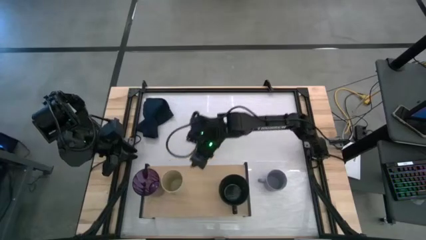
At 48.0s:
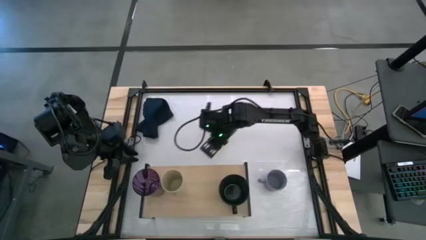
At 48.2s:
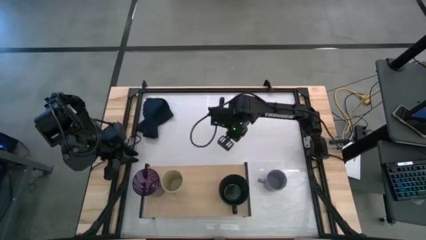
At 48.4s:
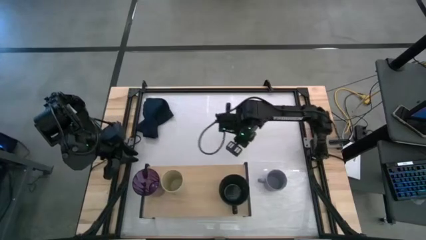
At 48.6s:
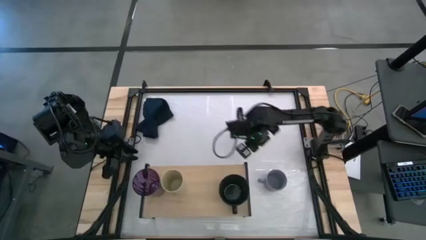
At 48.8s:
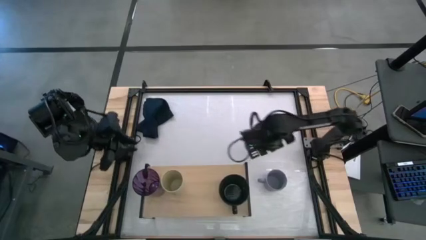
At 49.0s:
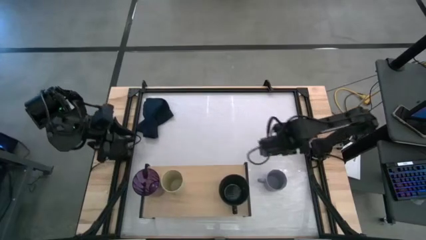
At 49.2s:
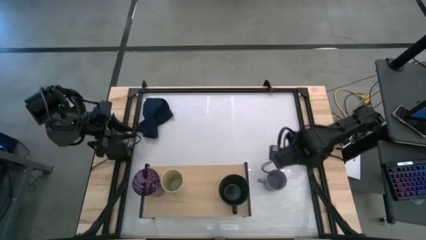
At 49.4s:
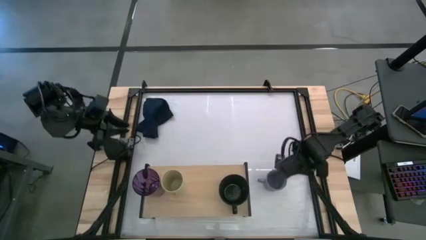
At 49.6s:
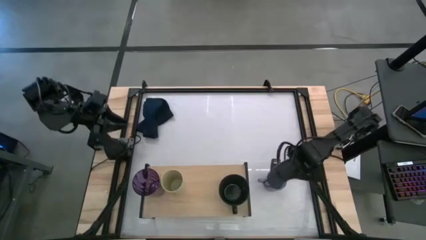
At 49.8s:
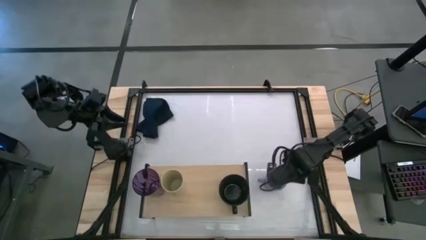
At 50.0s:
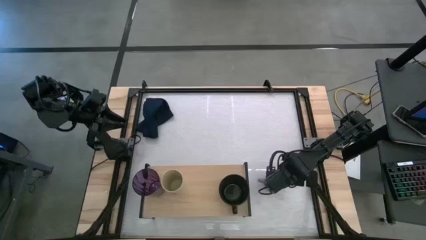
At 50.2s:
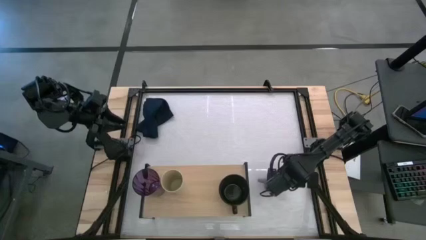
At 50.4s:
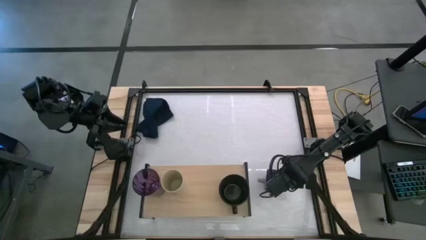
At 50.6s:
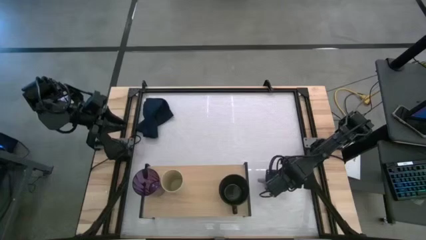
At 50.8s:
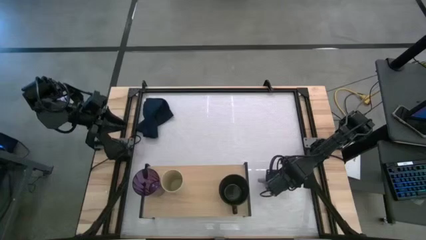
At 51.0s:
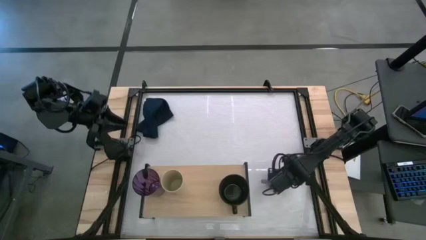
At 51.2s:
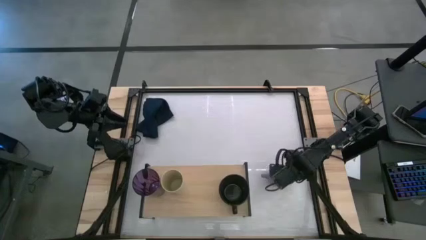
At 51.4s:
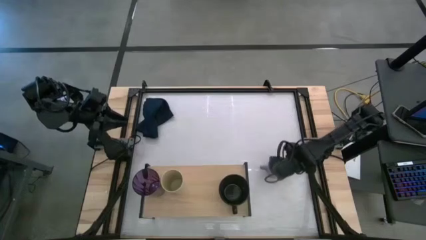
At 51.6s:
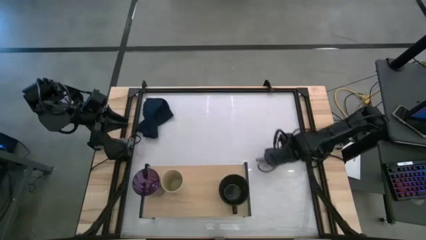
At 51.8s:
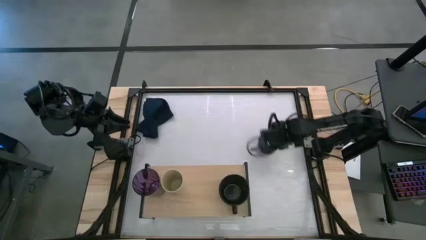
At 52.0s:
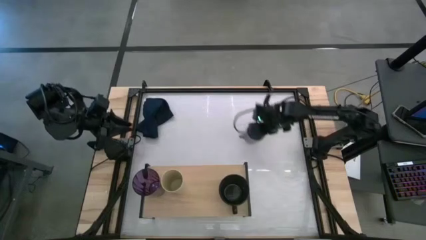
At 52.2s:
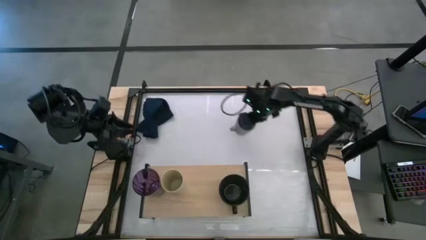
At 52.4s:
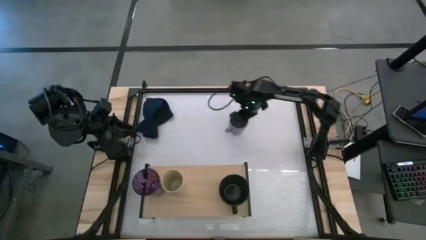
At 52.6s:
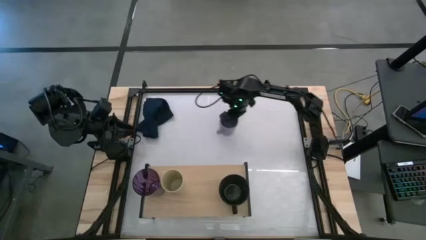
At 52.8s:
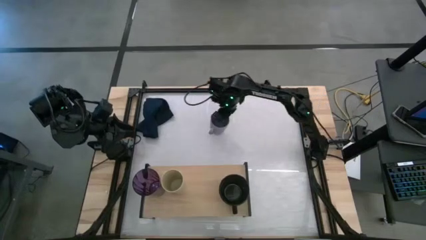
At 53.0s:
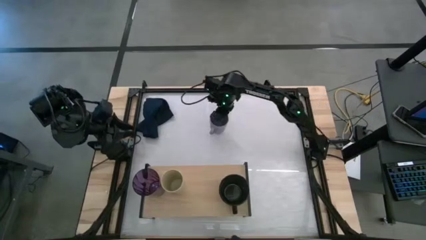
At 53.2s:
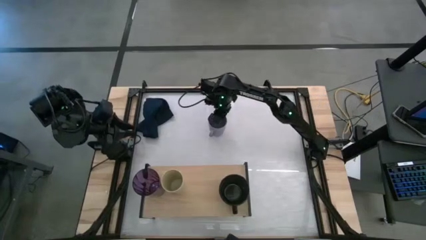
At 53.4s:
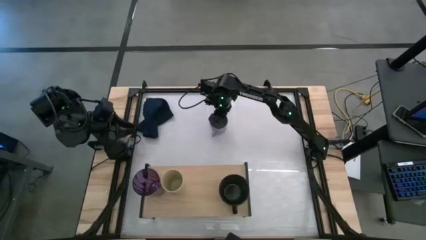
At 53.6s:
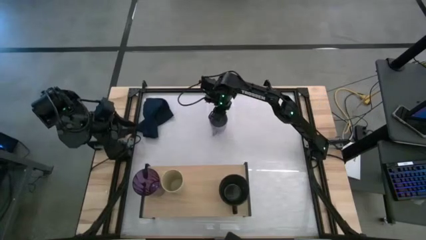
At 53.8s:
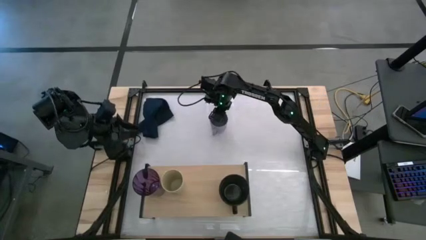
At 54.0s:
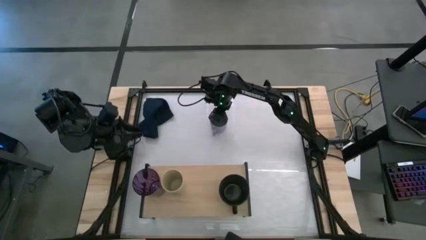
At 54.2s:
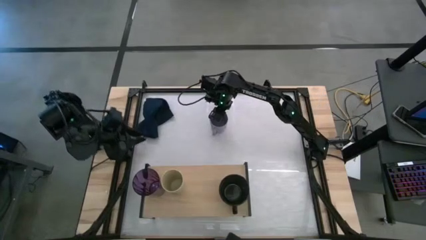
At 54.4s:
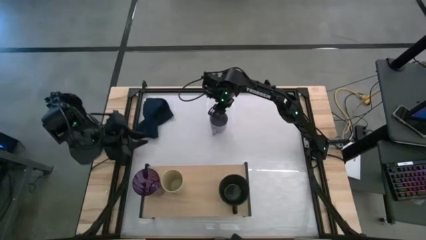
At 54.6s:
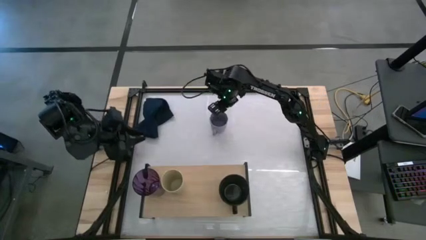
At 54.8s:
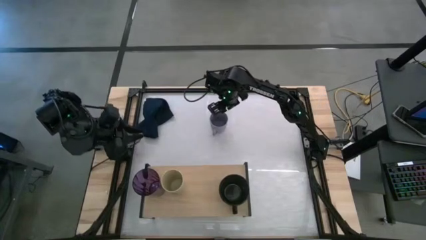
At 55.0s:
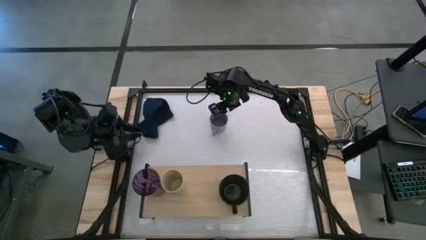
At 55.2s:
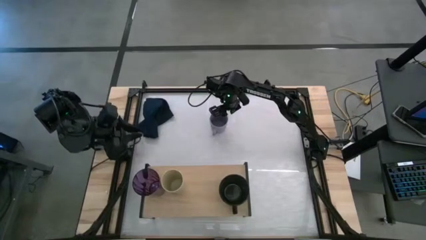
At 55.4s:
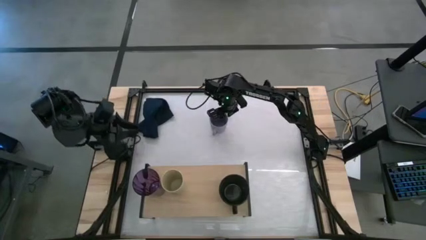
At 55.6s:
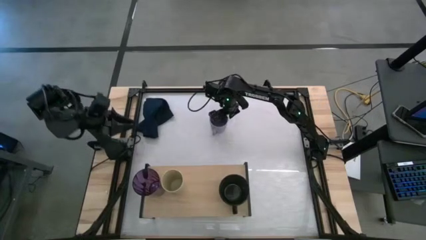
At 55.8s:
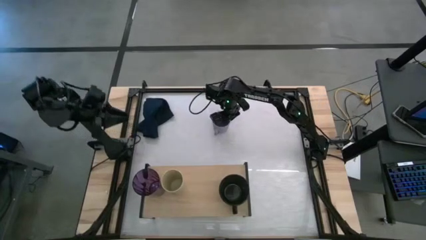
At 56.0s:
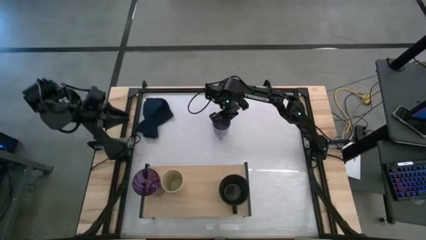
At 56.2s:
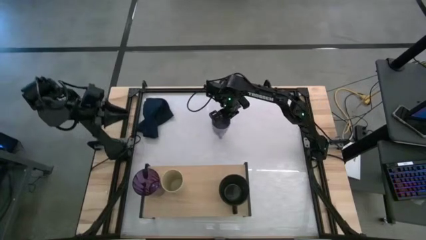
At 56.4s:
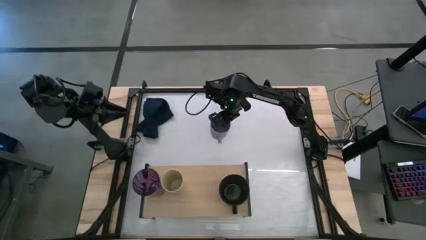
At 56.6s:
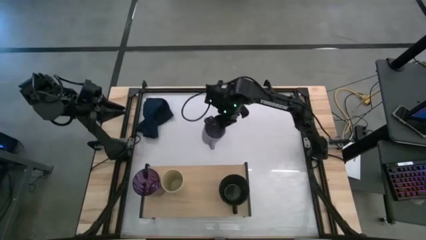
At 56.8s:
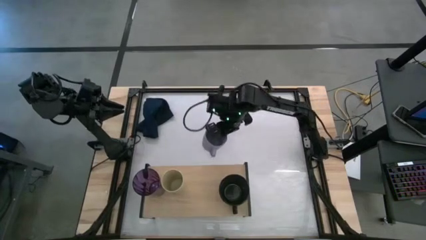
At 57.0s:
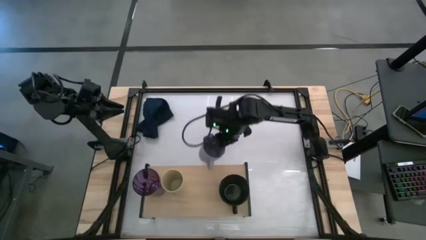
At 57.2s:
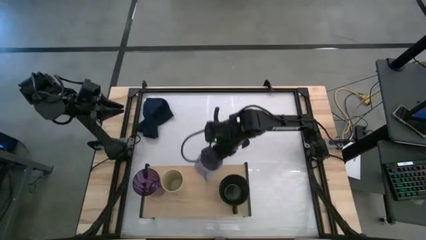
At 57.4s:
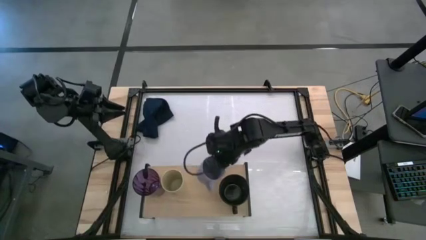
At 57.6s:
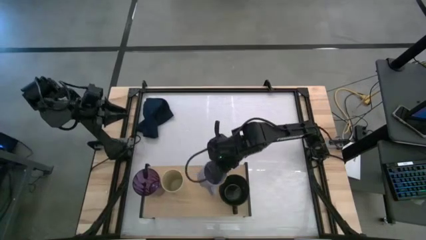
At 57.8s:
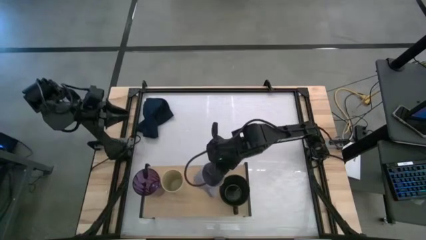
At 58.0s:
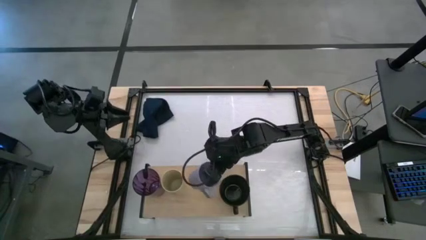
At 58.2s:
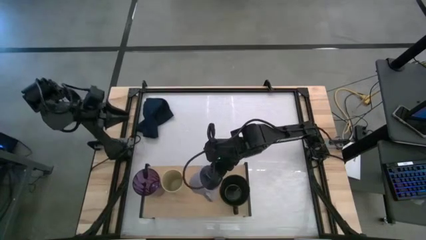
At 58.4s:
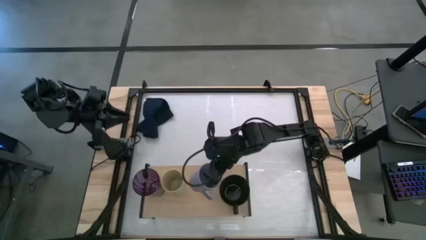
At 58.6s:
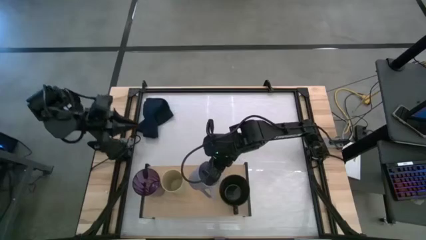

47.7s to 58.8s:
Task: Stack small to large cups/mugs on shelf
Put the gray mug on the shelf

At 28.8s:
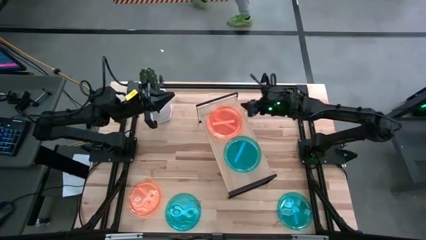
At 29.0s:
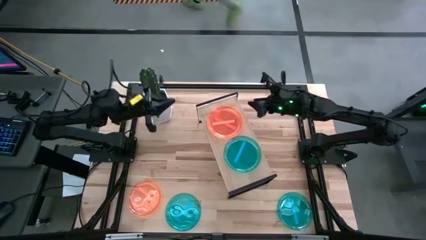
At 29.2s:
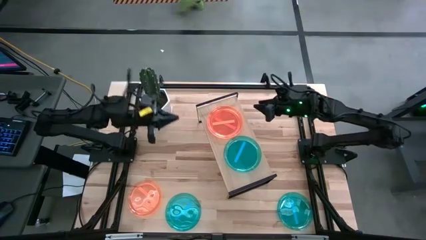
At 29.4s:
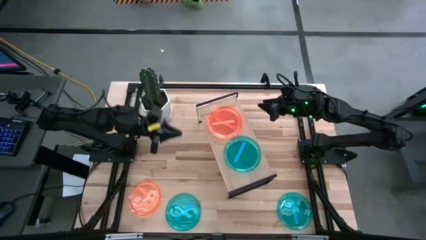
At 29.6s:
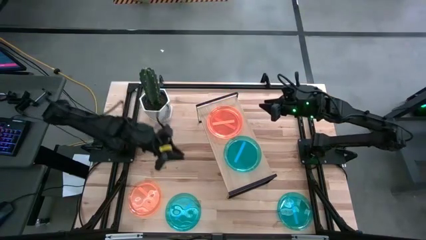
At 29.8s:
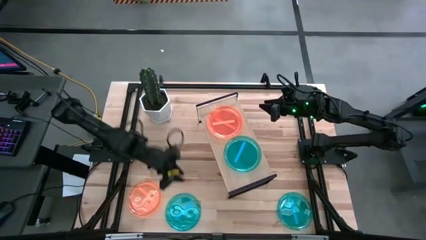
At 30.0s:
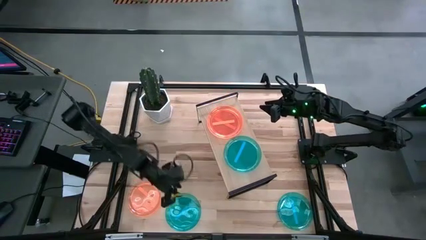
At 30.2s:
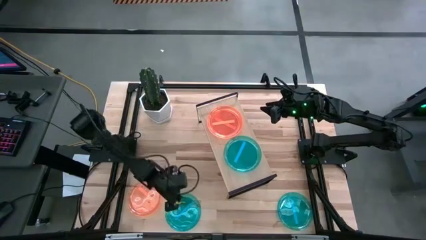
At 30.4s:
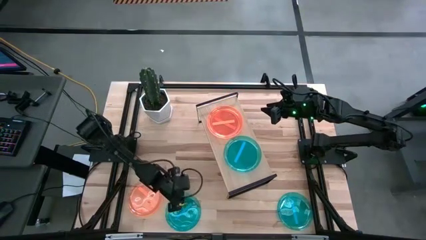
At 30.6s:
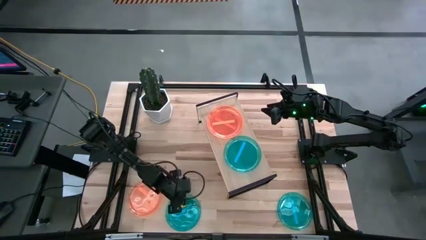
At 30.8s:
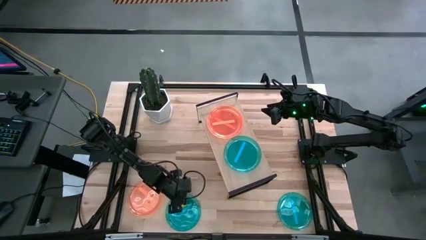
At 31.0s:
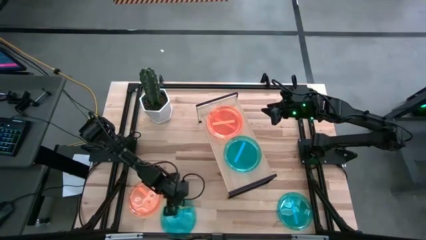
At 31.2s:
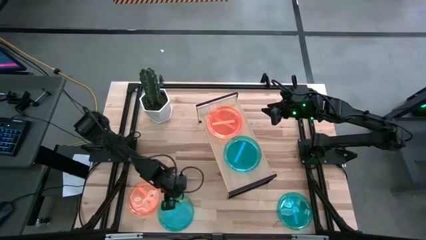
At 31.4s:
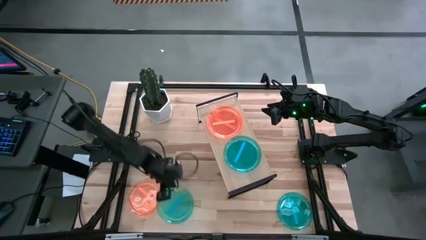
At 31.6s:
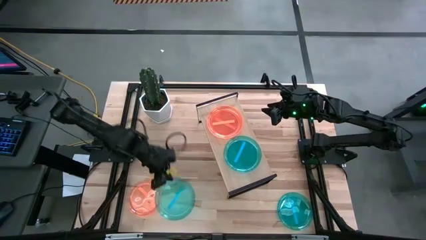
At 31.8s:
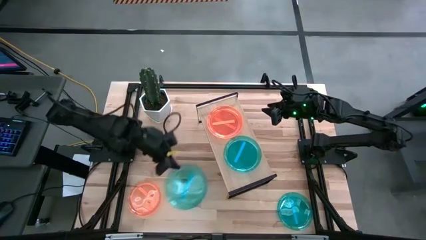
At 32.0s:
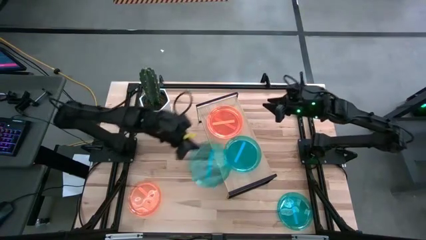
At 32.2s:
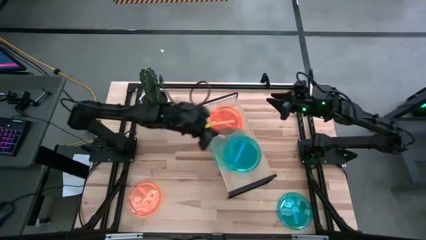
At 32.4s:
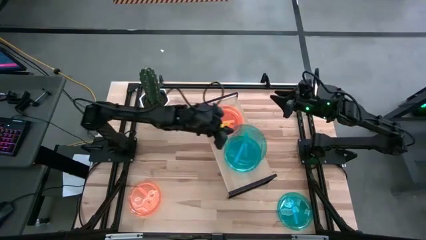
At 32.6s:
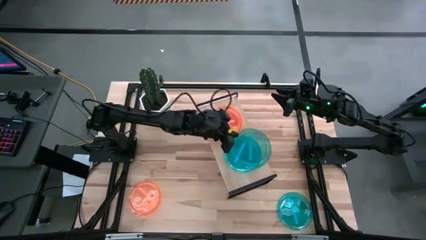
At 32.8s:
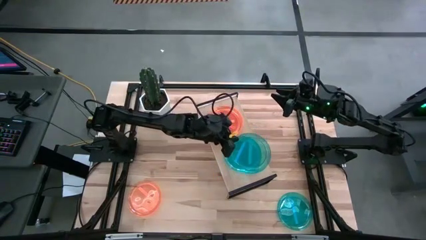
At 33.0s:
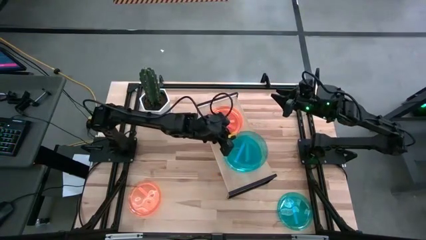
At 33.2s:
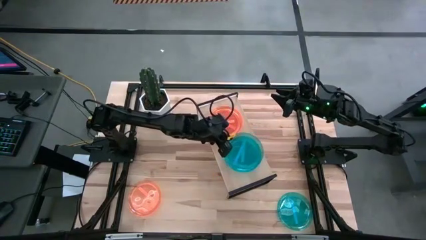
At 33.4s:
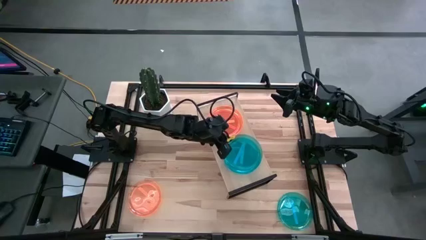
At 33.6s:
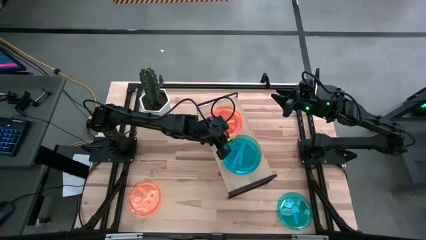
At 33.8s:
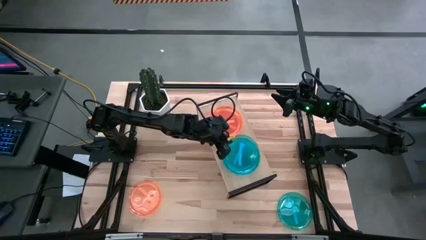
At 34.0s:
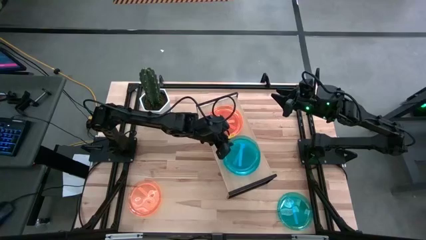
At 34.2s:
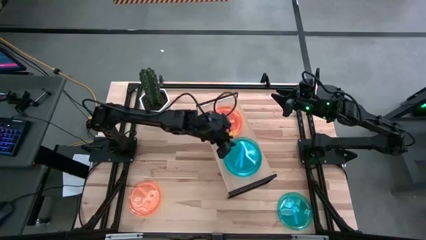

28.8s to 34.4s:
Task: Place and stack plates onto a shelf
Stack the left blue plate on top of the blue plate on the shelf

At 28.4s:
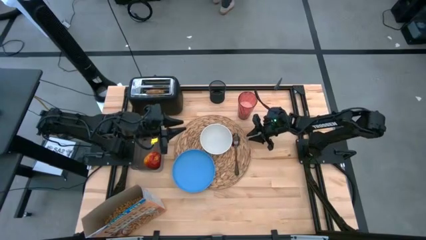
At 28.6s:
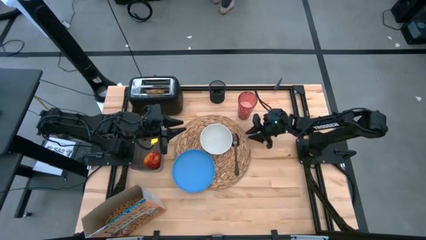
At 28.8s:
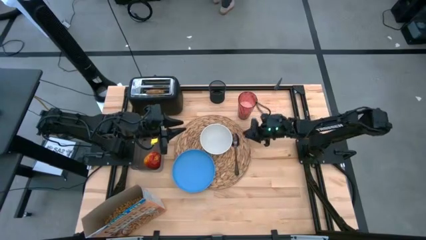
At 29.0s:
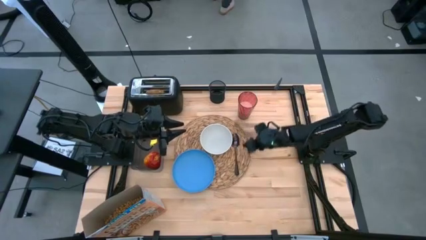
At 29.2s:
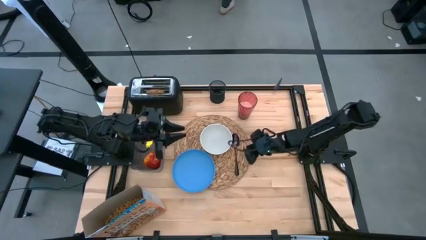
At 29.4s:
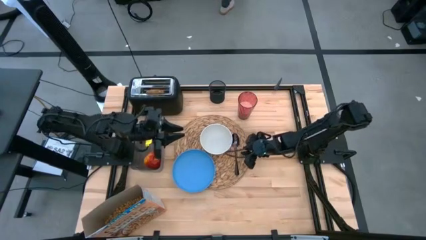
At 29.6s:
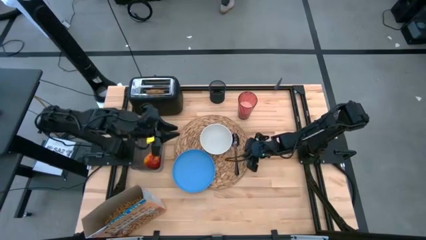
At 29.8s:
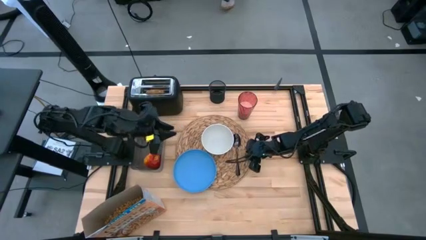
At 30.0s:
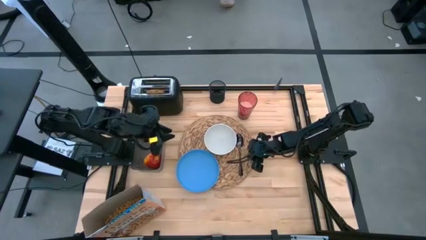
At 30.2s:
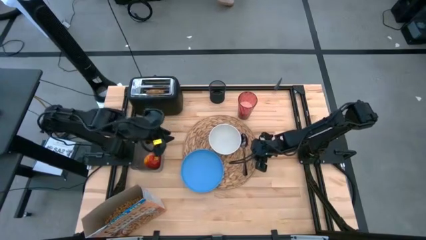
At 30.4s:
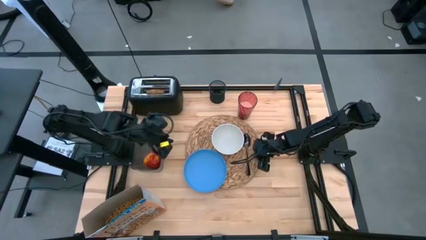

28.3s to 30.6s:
Task: Arrange a breakfast setting
Adjust the brown placemat
